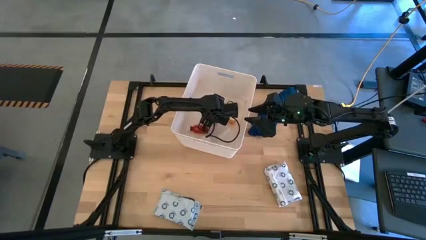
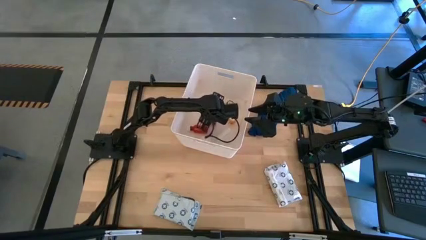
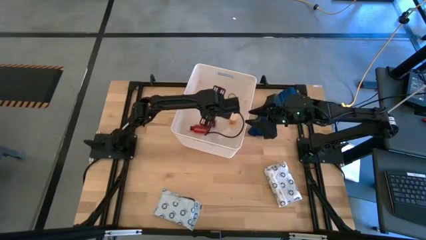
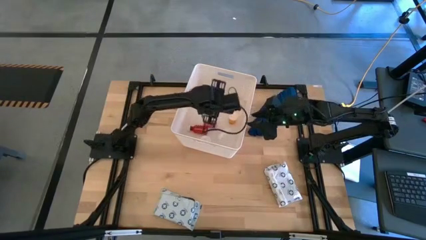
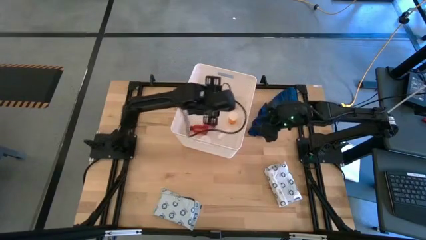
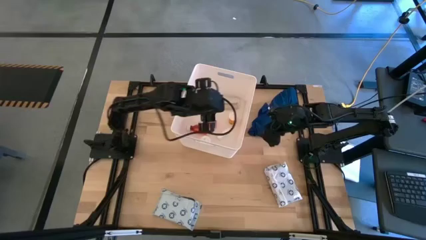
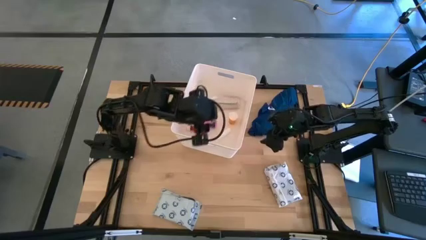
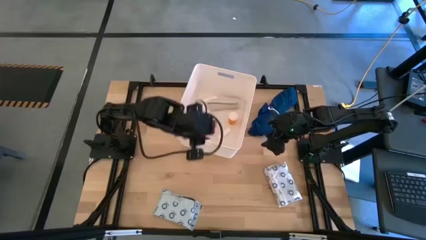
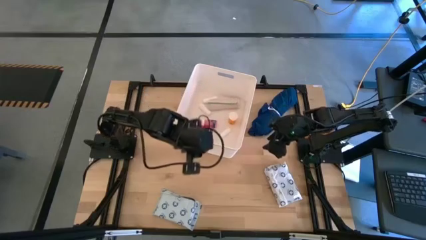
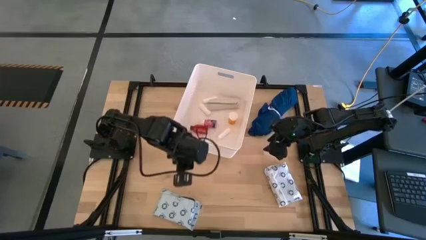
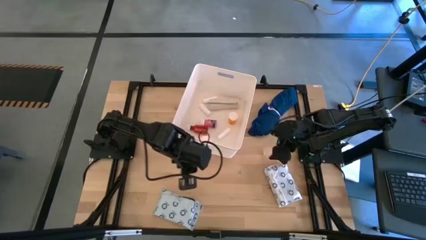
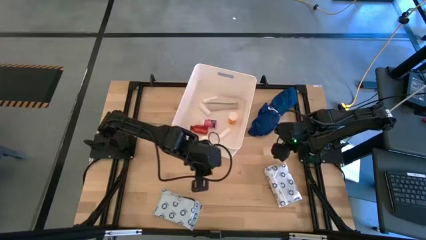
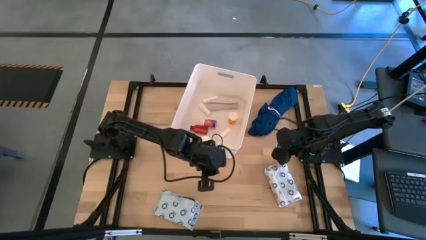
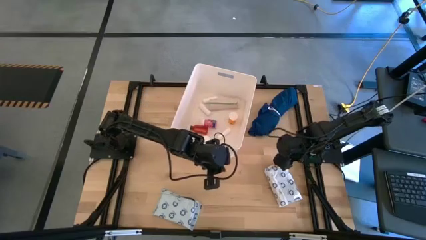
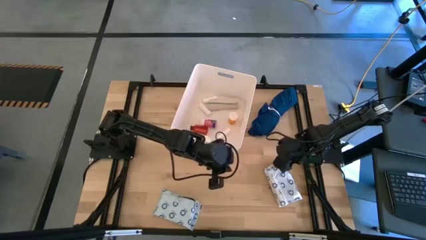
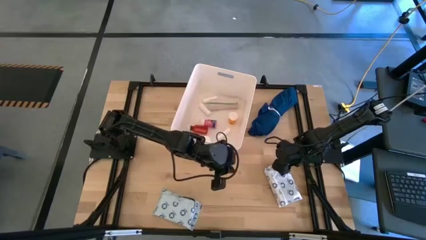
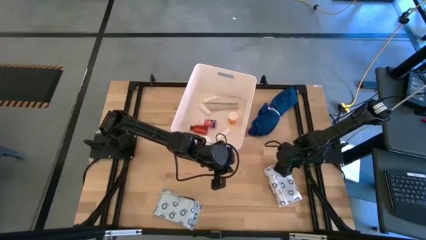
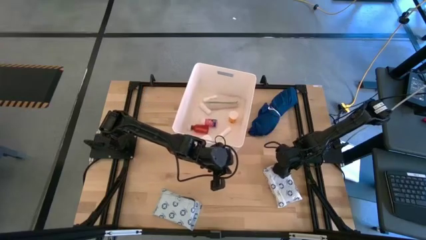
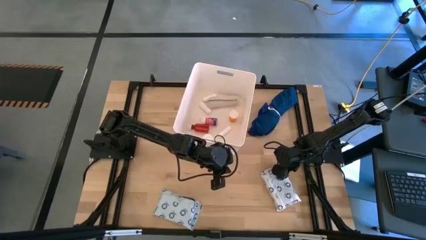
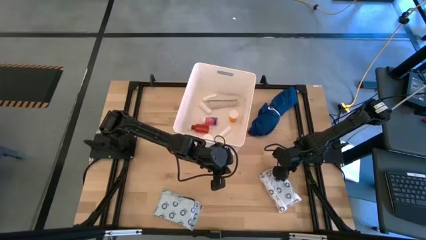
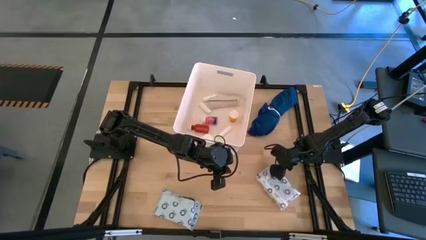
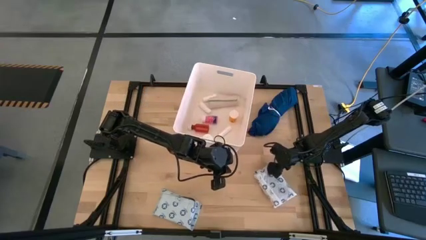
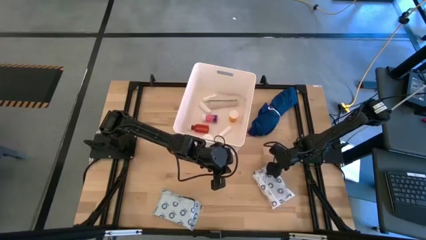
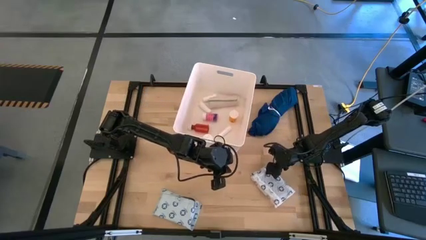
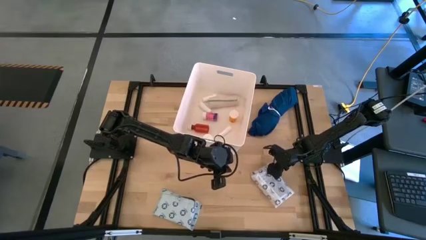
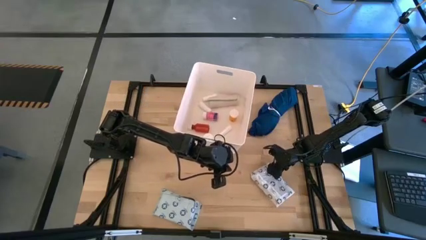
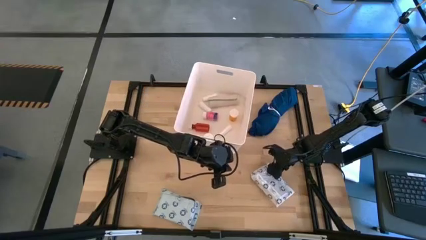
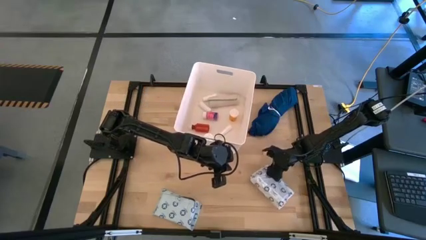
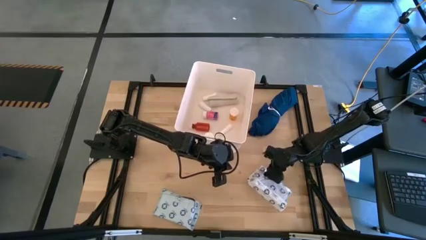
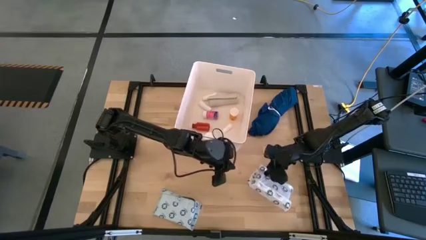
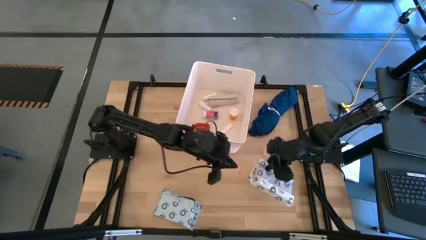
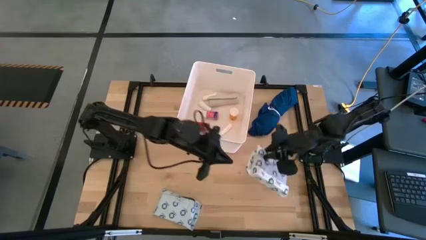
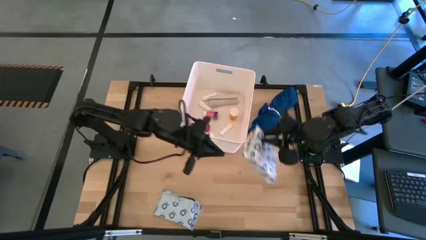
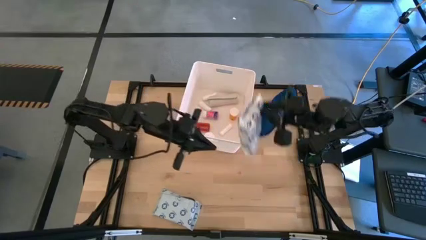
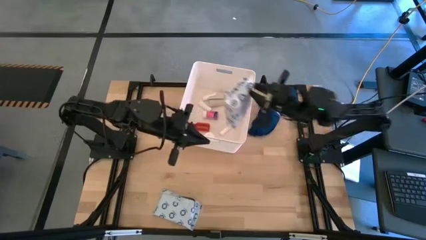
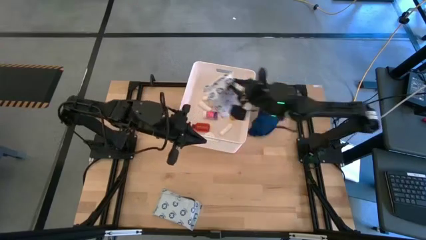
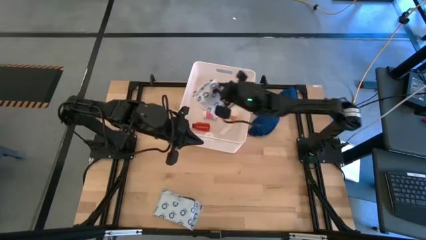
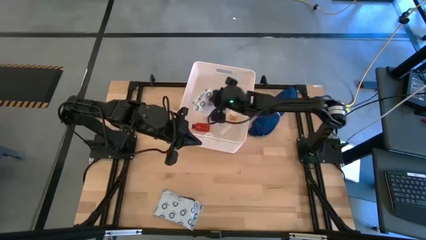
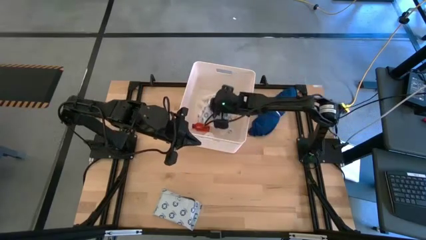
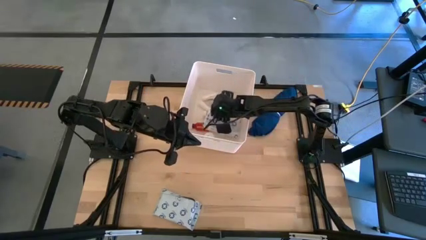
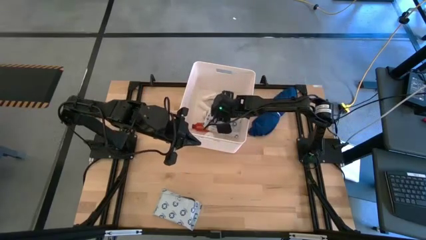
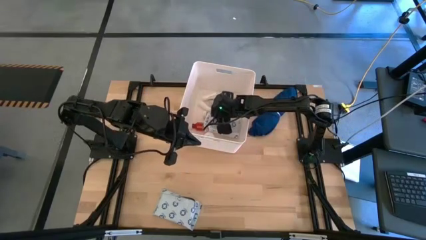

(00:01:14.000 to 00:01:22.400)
Task: Pick & place medical supplies in basket/bin
Put the right white mailer bag into the white basket

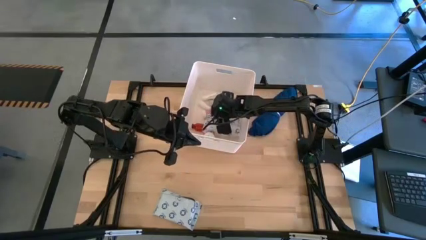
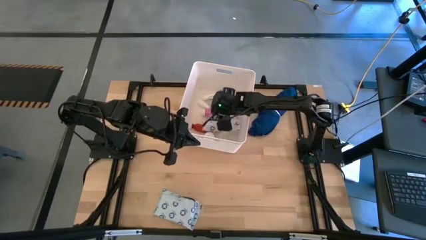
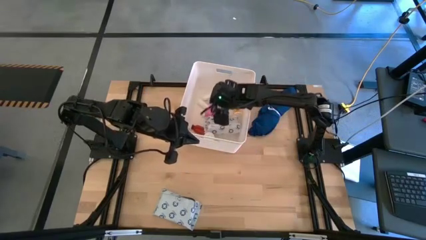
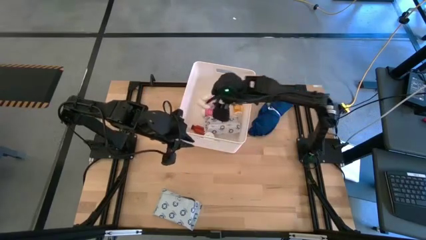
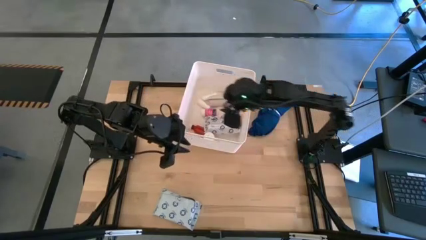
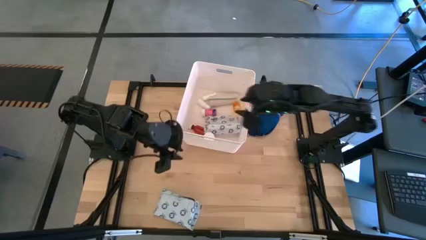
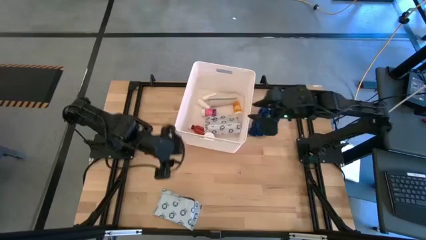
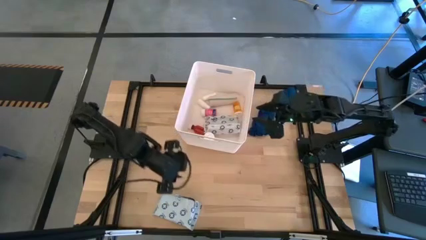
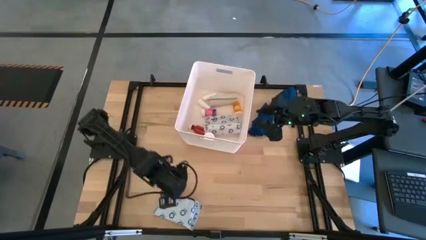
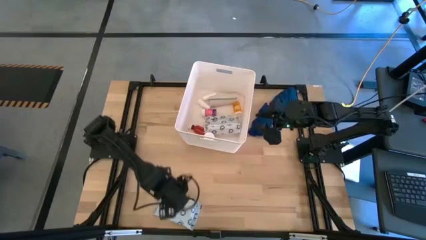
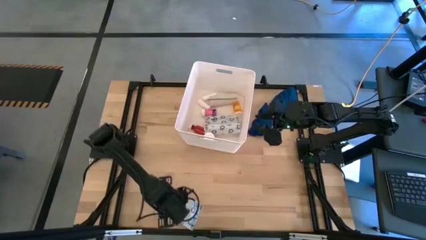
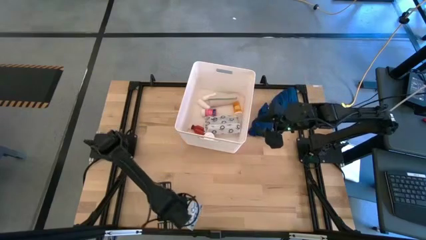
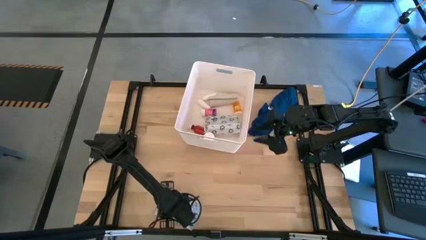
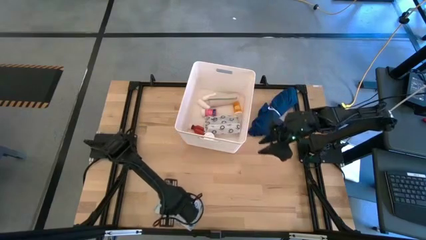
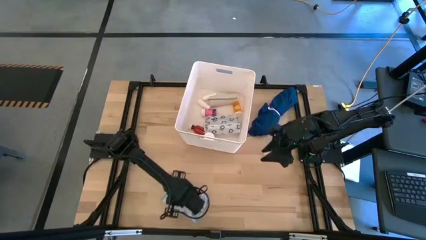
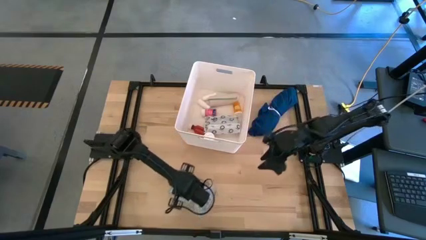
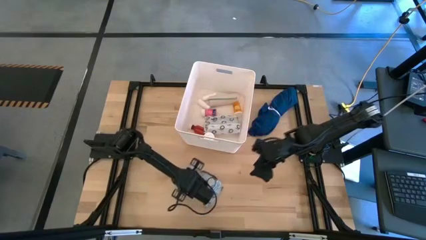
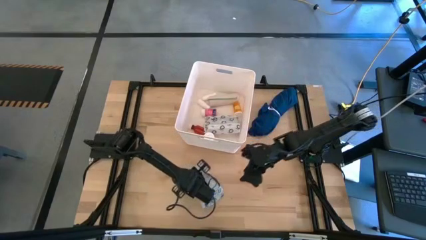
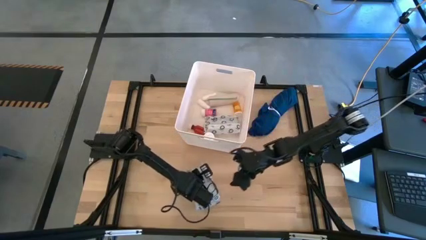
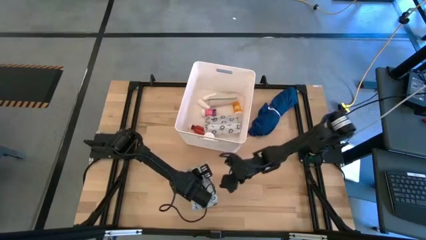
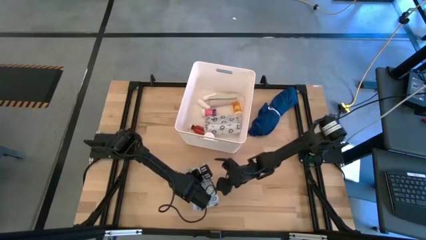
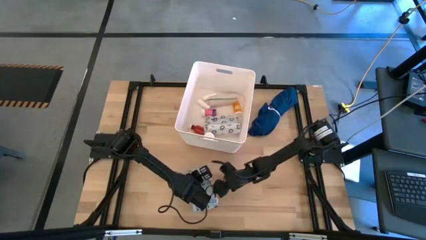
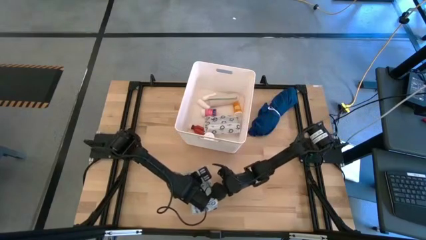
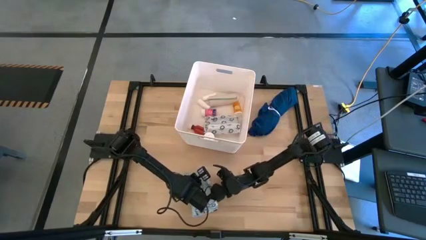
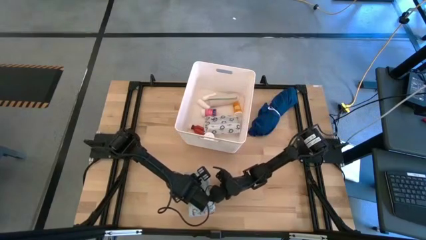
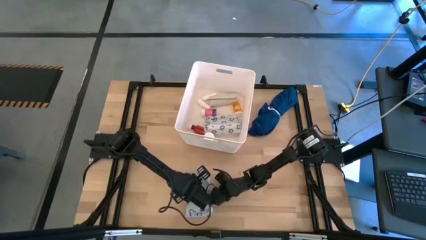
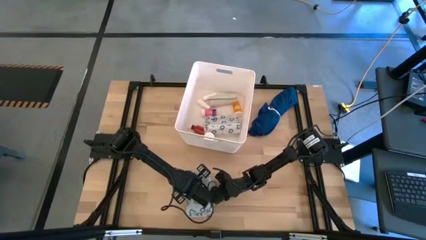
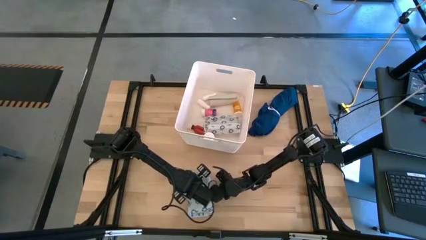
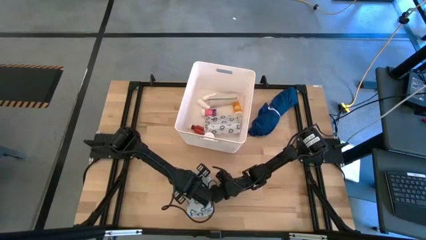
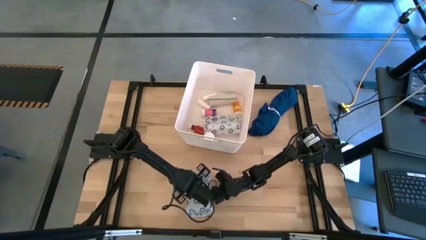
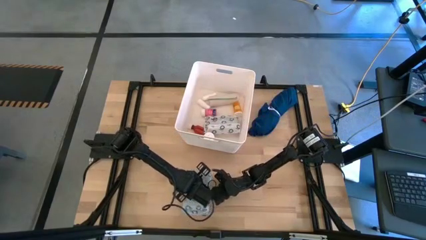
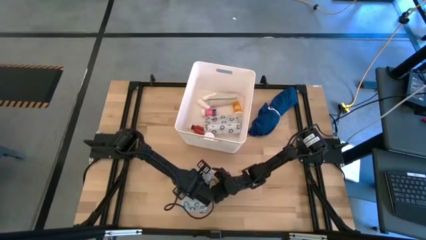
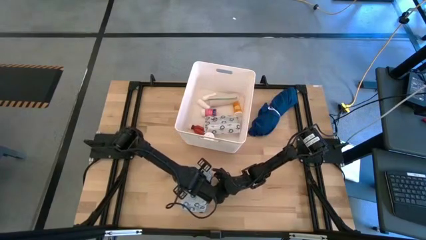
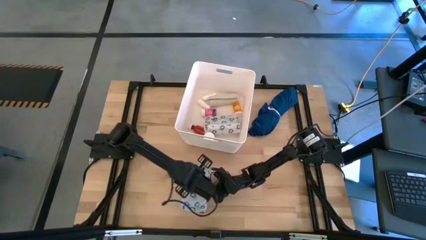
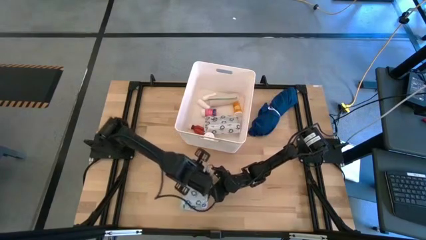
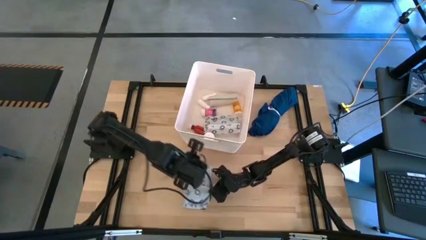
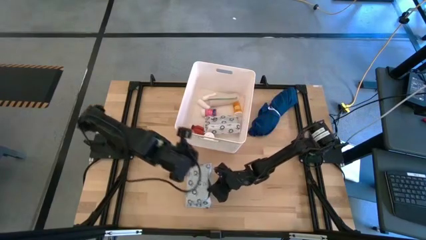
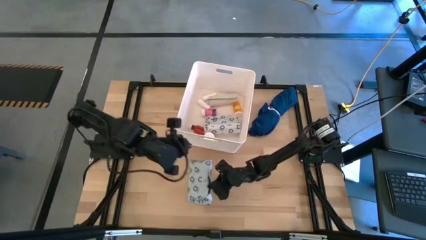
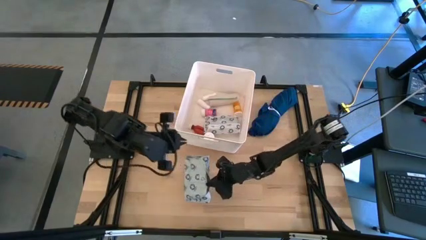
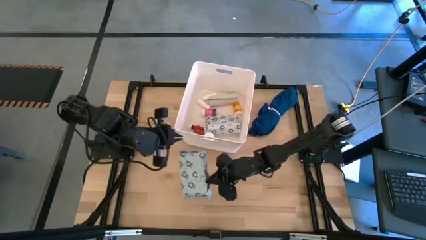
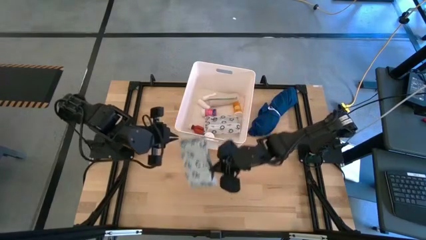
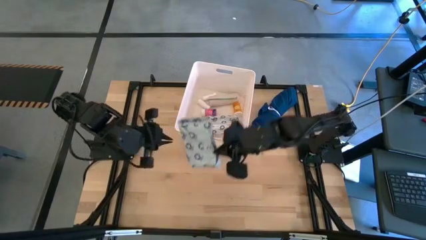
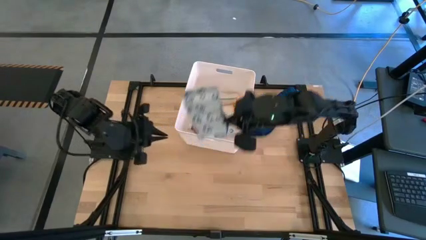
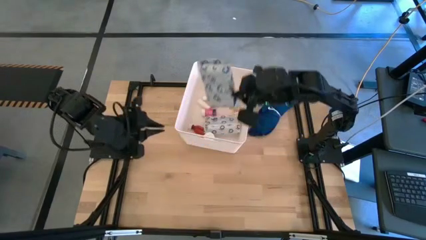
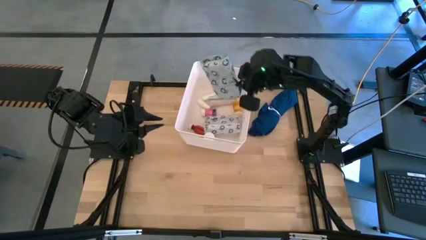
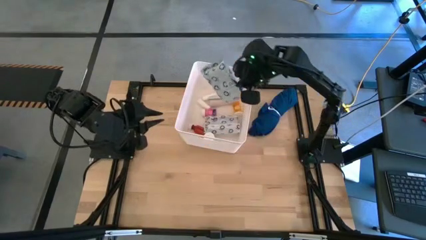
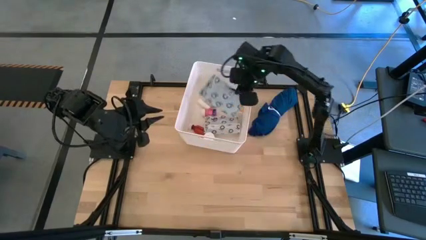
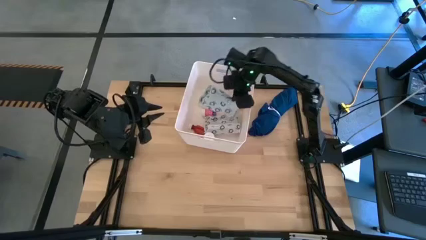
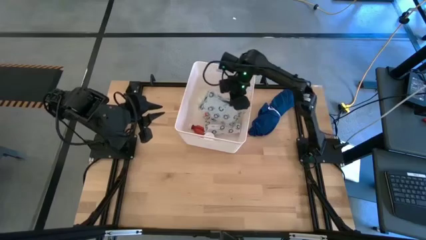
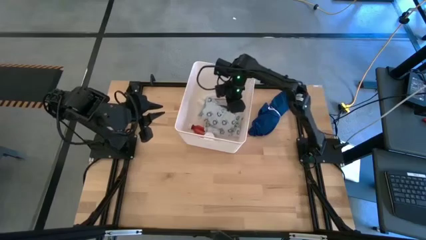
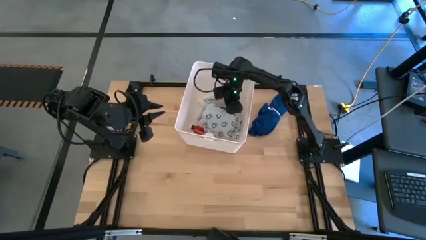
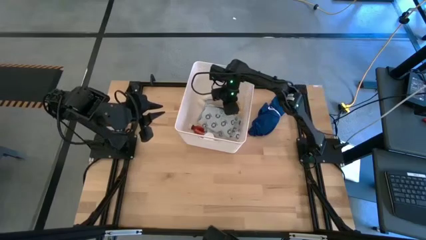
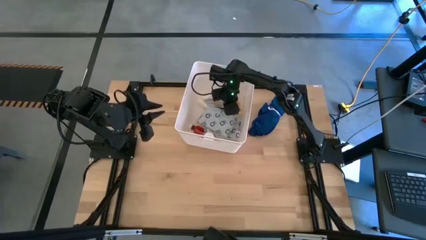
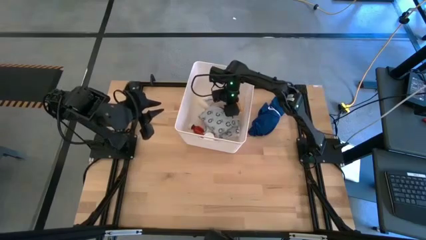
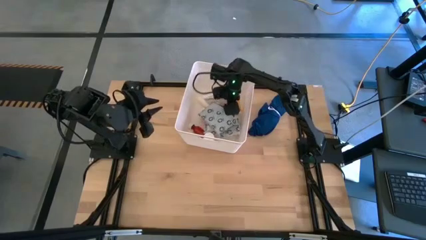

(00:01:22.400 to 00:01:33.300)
Put the white mailer bag into the white basket
